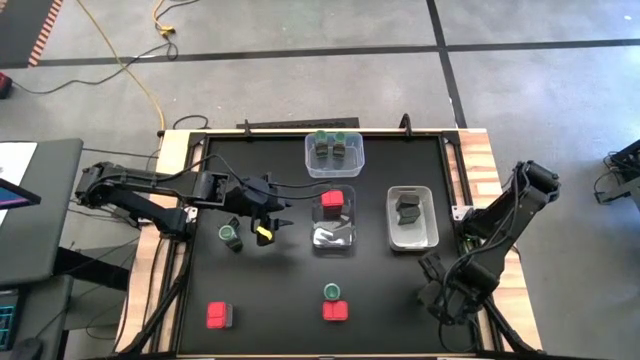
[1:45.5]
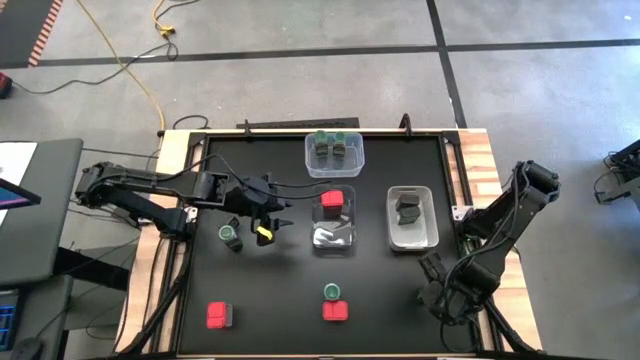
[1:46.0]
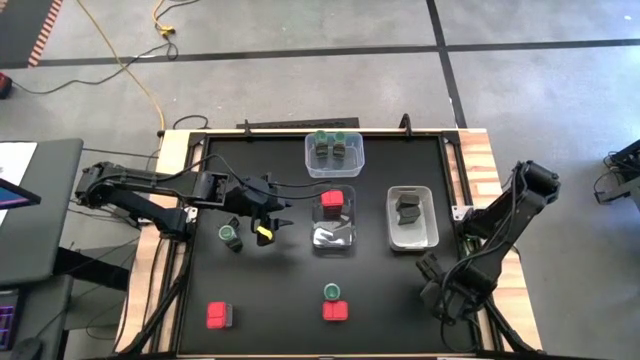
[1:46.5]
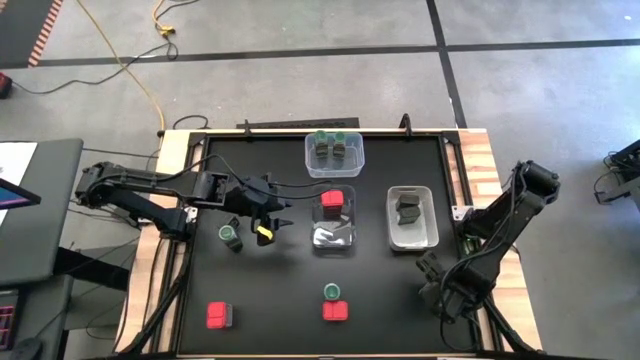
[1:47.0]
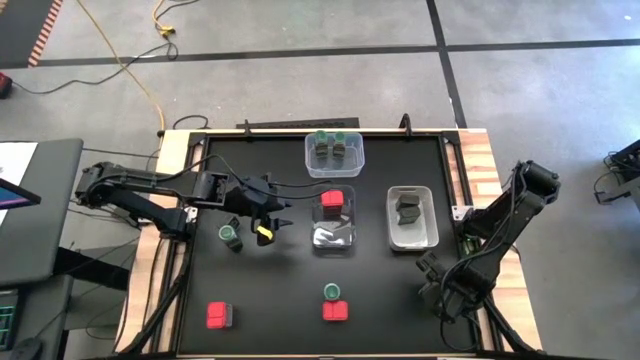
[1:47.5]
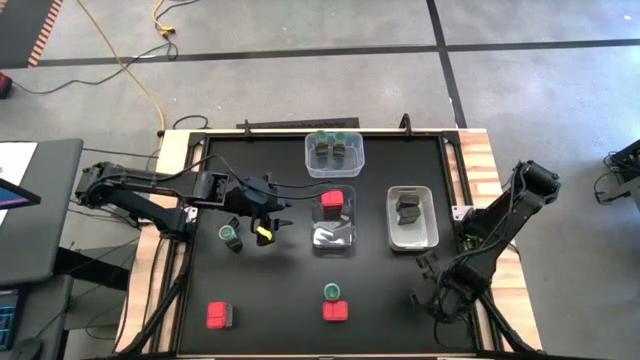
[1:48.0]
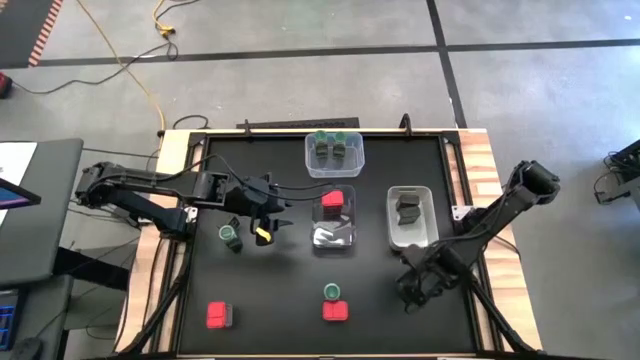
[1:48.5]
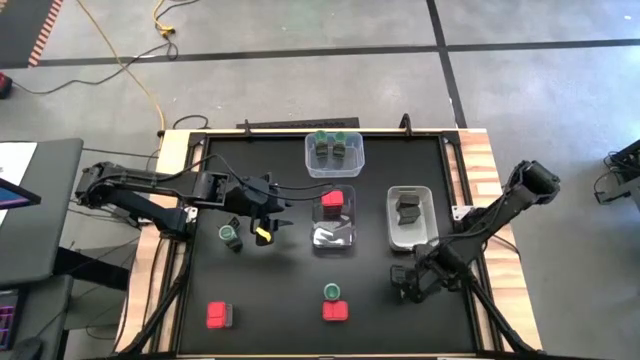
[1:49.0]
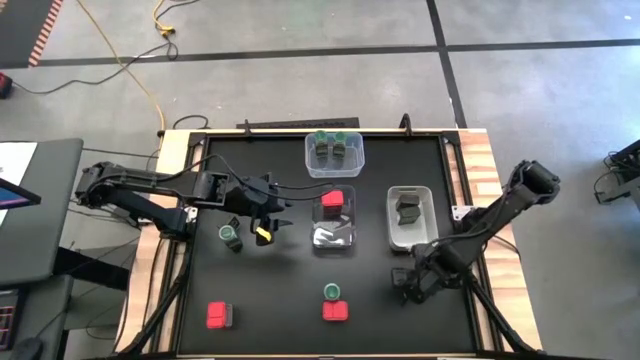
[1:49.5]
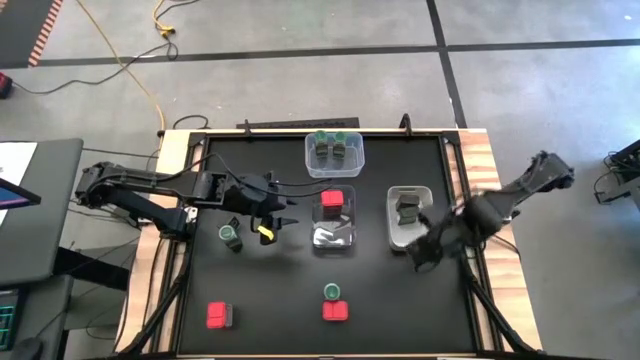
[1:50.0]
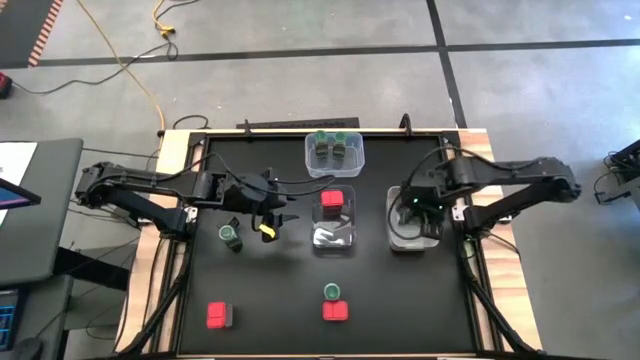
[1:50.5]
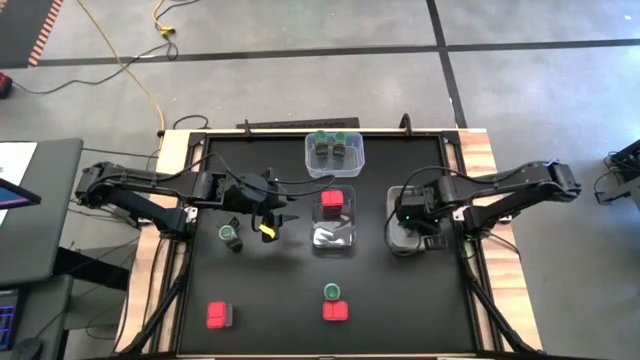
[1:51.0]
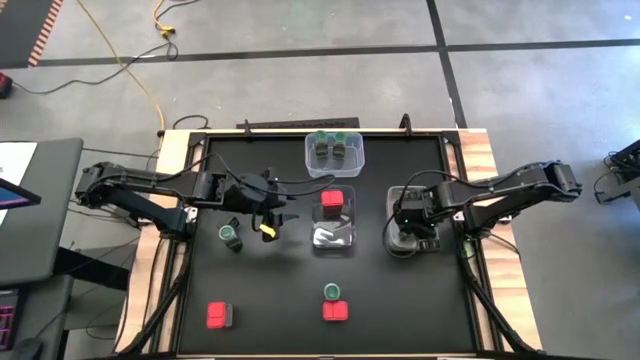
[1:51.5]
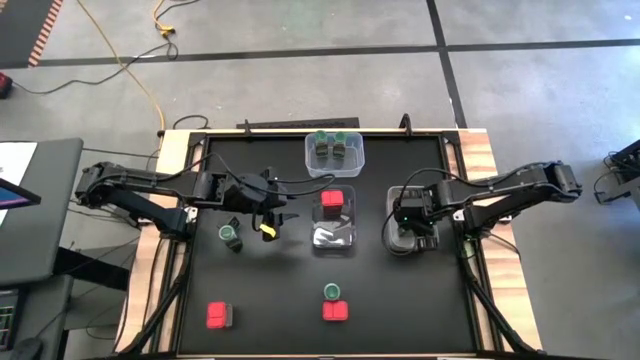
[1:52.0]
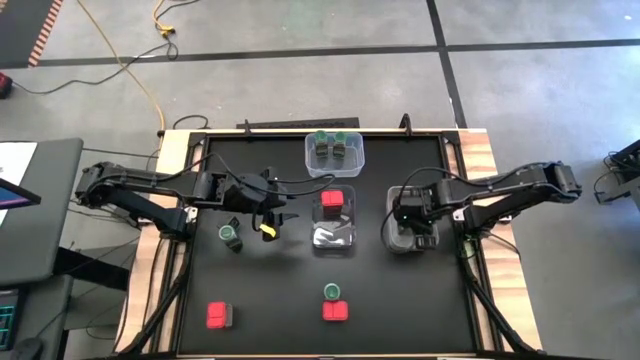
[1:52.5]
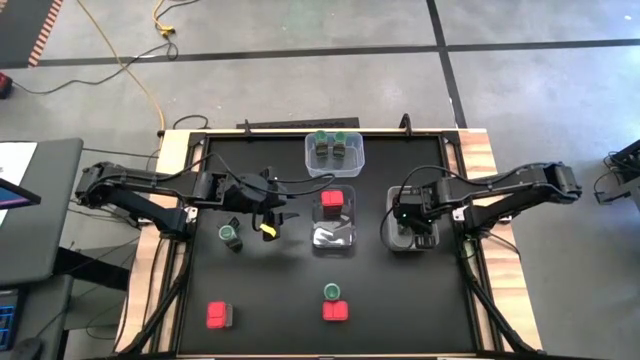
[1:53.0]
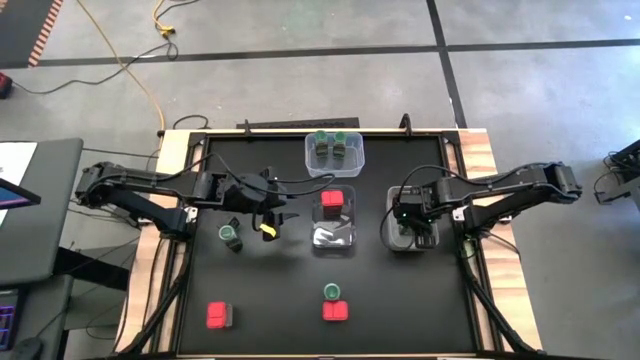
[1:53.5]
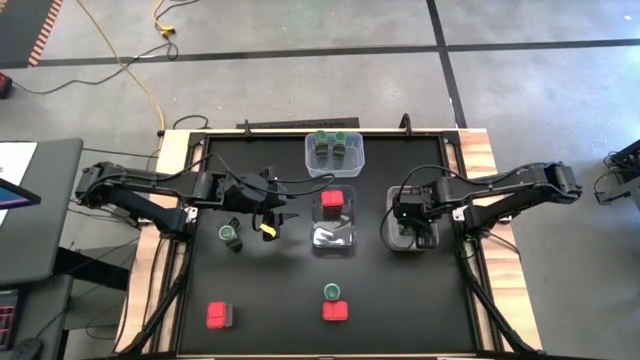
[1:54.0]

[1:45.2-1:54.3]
Task: Sort spices by type
Put the black seasoning can into the gray bin

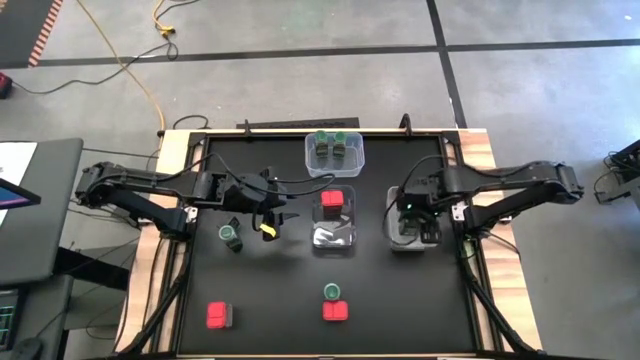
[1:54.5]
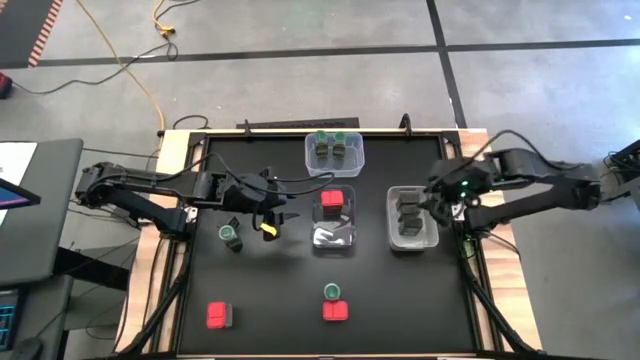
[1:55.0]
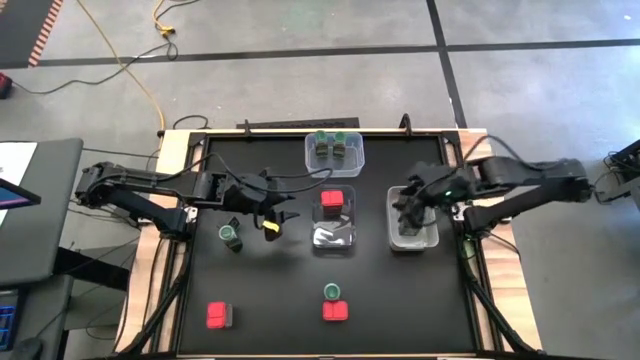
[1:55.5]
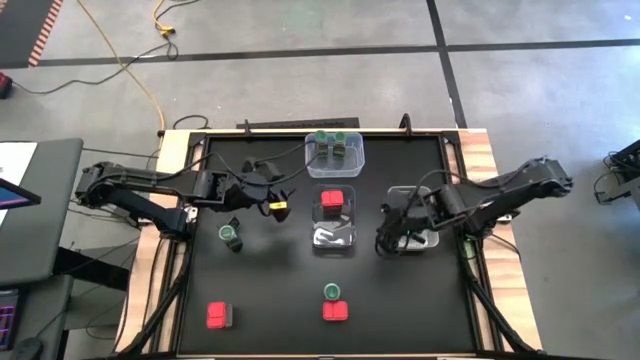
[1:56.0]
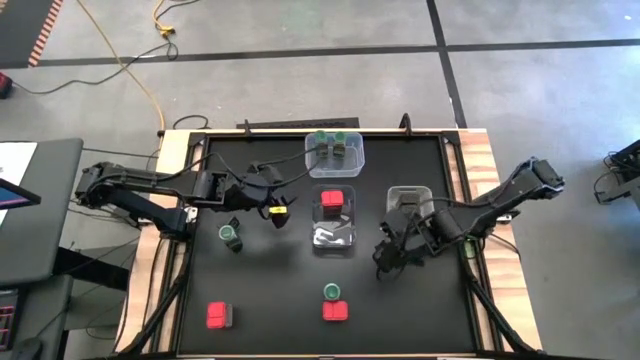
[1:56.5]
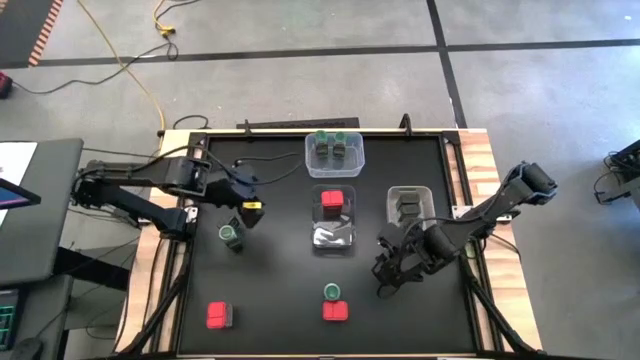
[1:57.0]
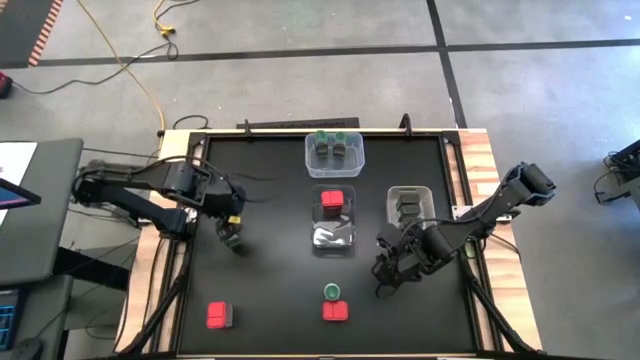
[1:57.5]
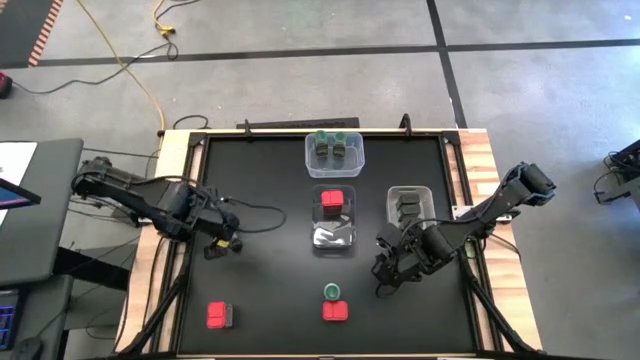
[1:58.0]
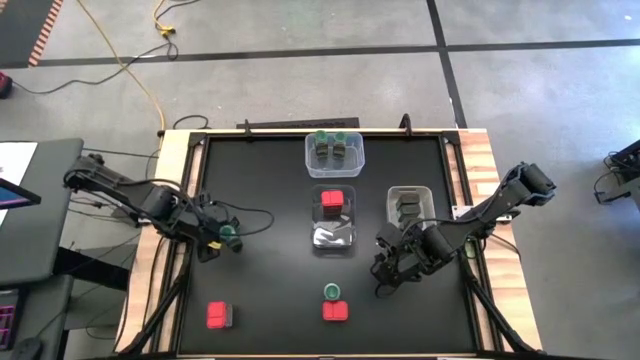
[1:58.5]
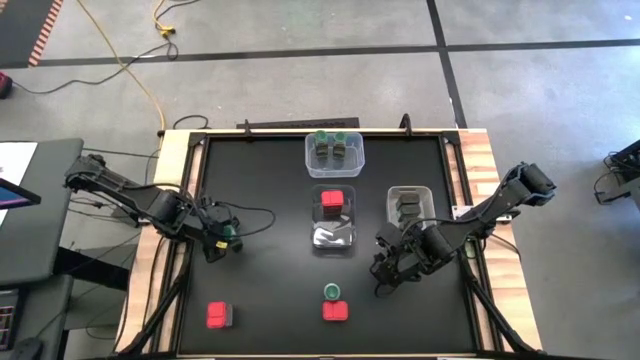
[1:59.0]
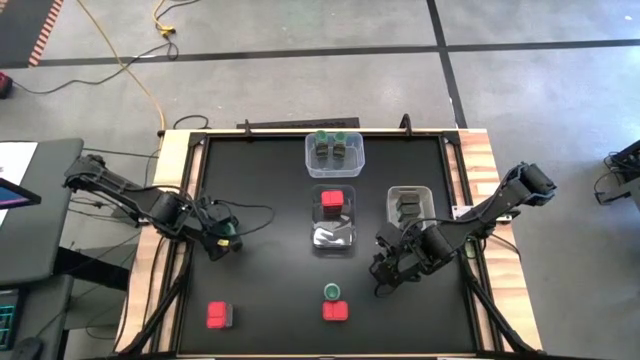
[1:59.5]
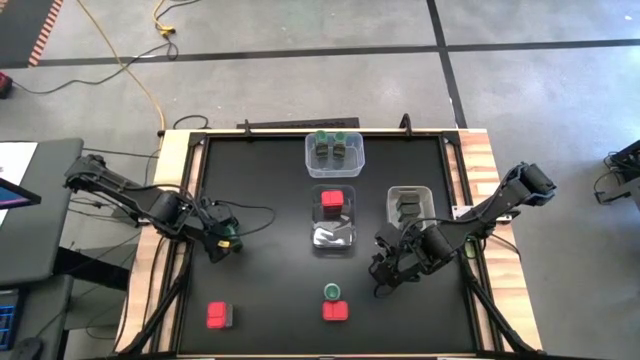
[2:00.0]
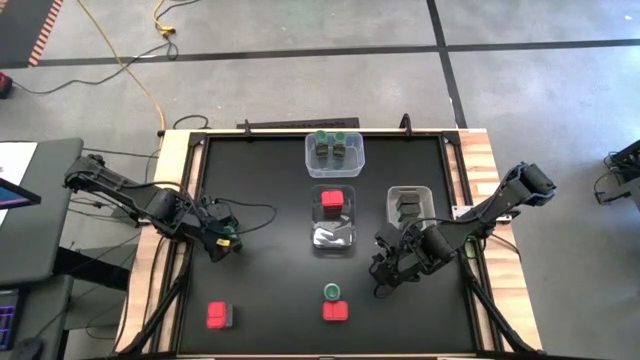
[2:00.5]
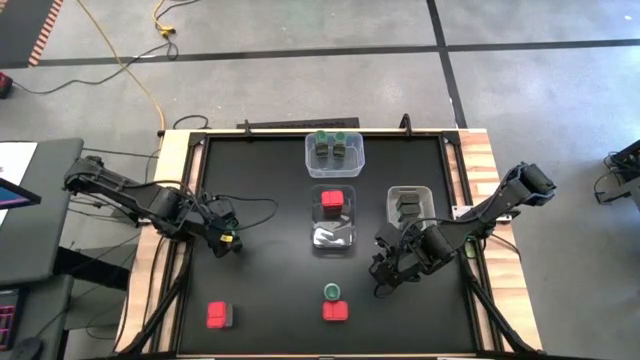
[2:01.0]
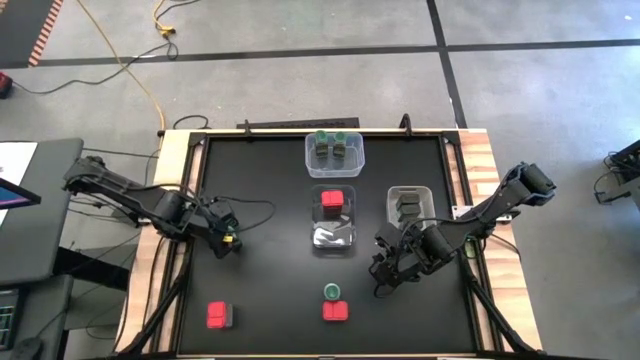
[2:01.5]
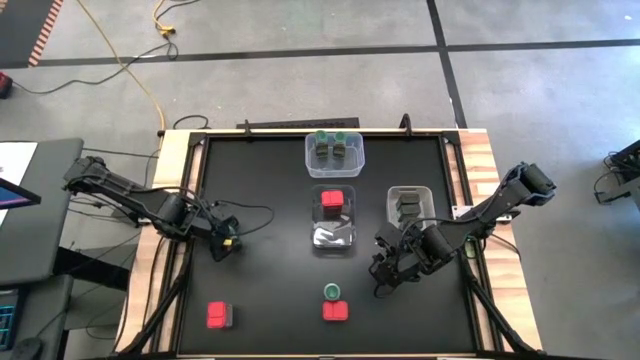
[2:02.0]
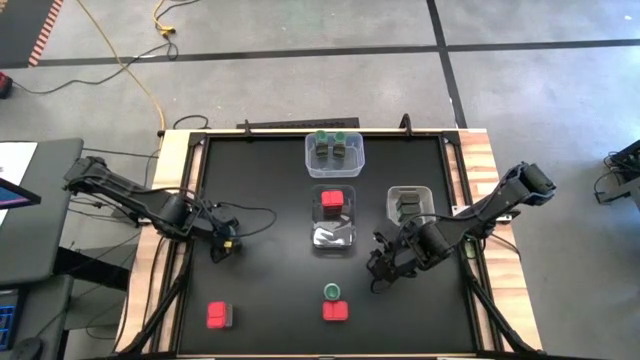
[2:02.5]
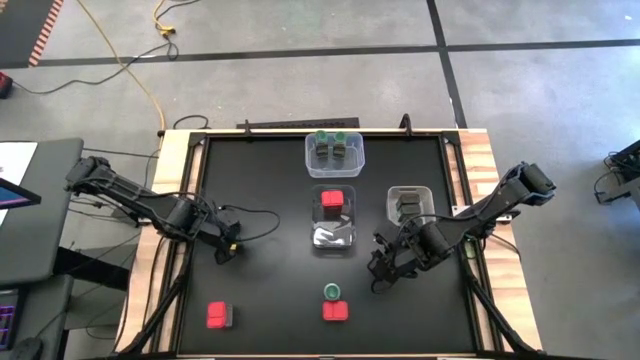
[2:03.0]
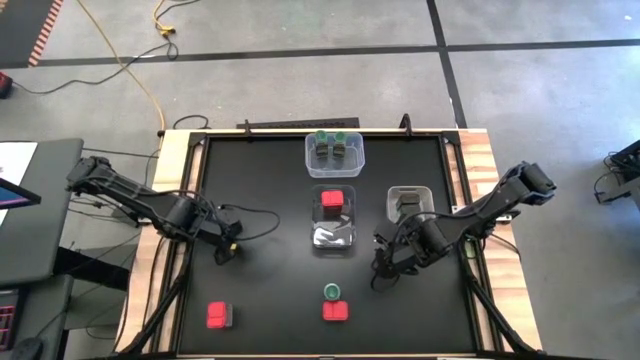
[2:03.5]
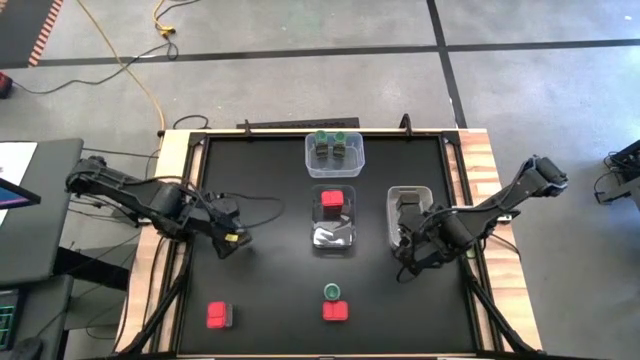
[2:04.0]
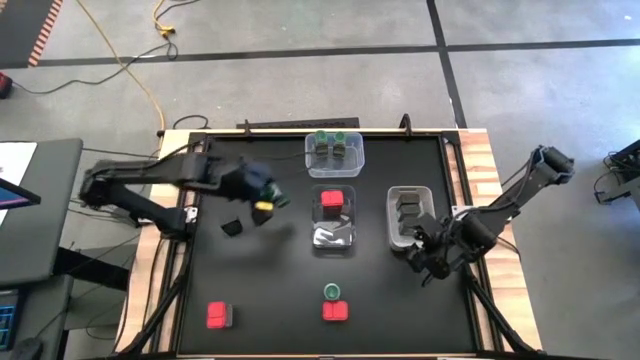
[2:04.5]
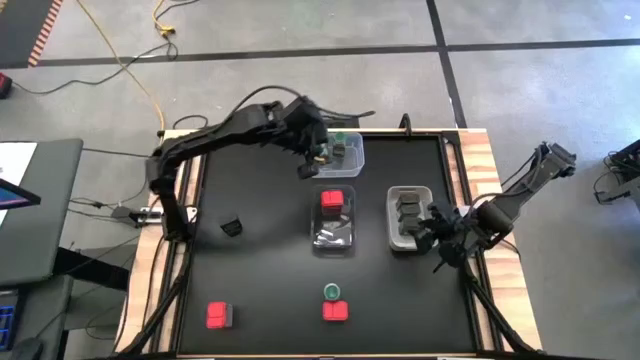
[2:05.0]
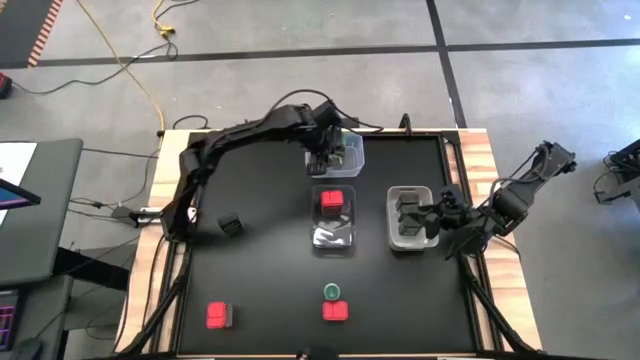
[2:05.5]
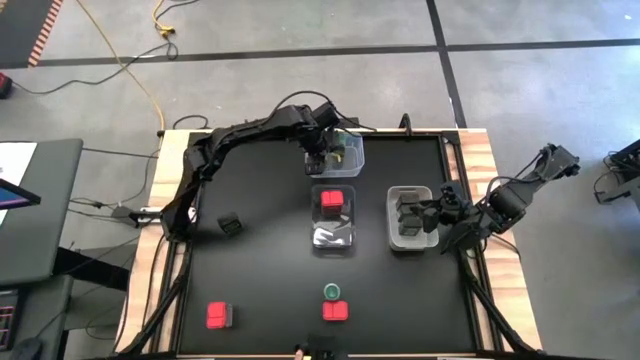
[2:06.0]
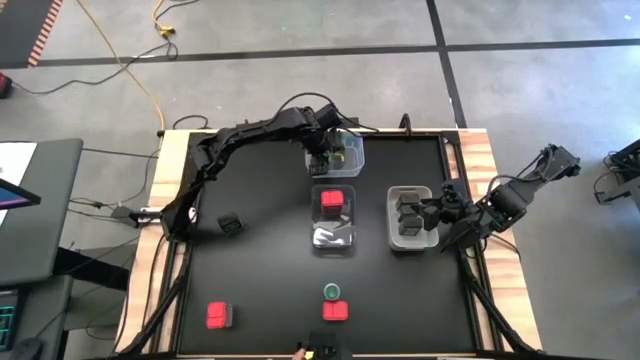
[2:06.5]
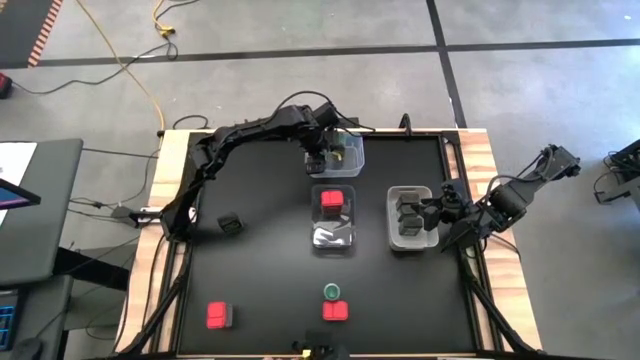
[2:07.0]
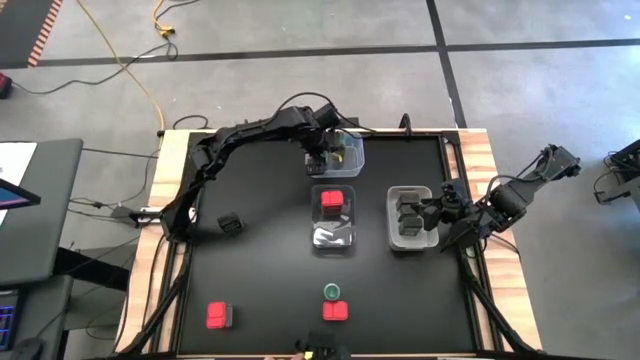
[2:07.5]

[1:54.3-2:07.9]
Put the green seasoning bottle into the transparent bin
